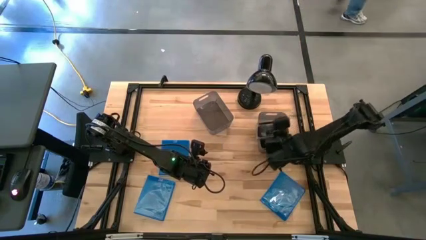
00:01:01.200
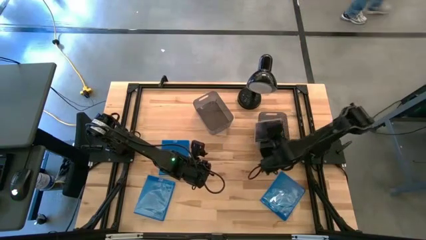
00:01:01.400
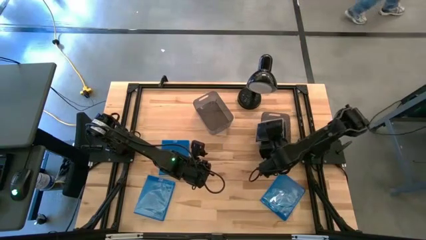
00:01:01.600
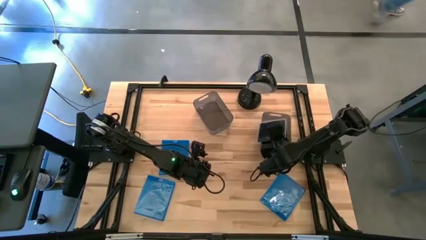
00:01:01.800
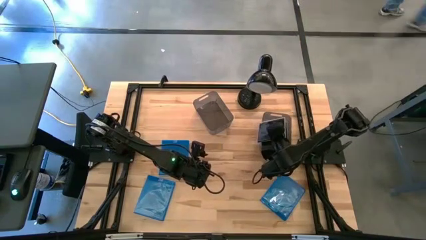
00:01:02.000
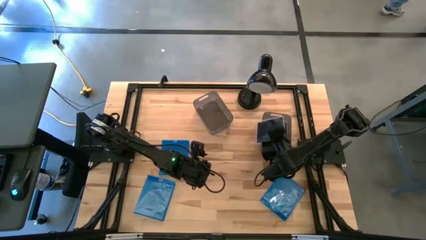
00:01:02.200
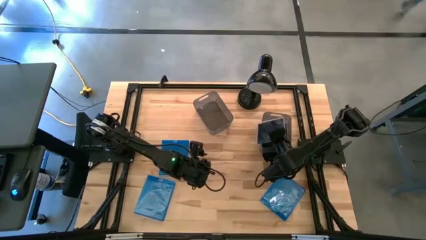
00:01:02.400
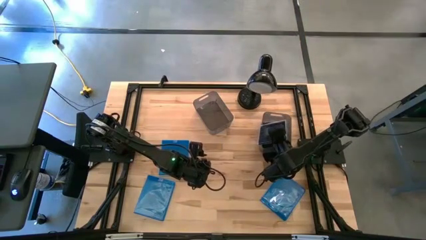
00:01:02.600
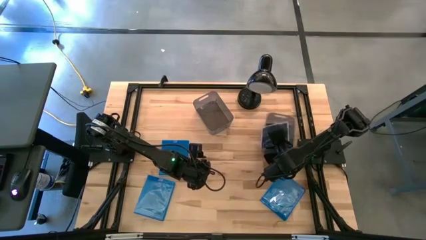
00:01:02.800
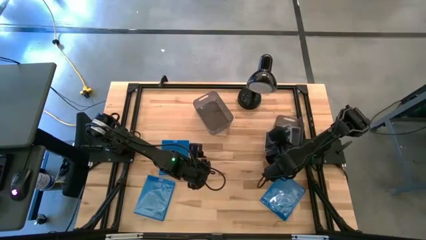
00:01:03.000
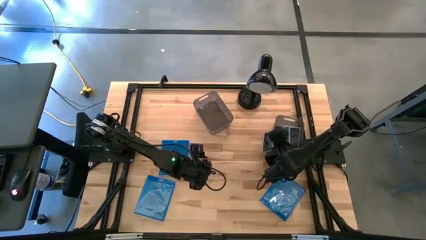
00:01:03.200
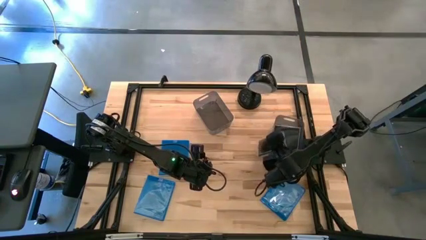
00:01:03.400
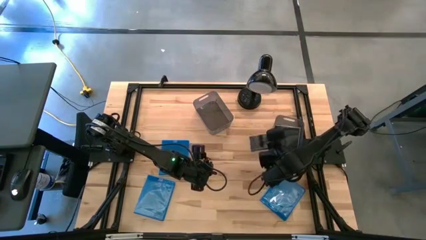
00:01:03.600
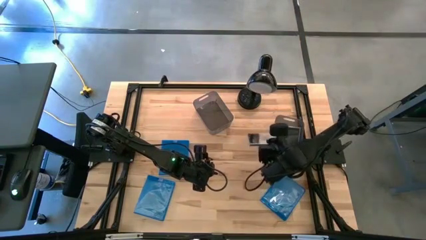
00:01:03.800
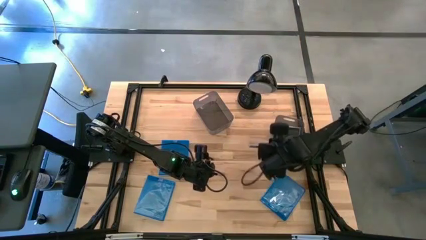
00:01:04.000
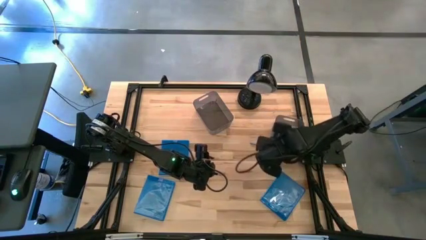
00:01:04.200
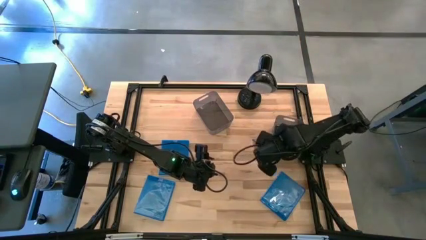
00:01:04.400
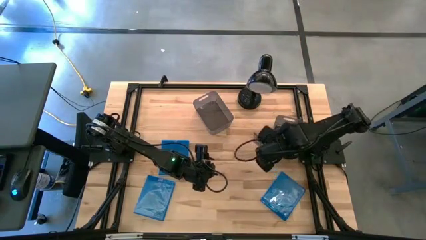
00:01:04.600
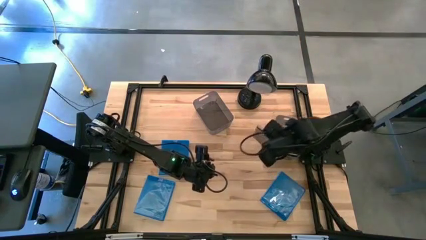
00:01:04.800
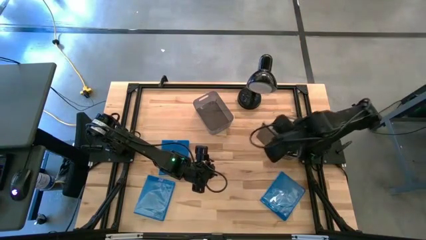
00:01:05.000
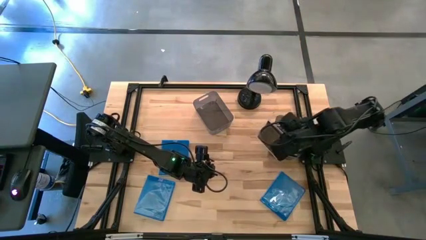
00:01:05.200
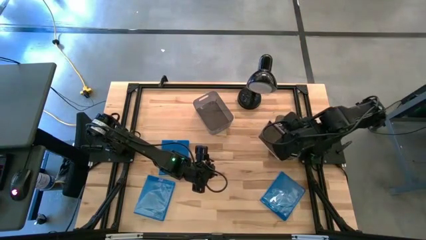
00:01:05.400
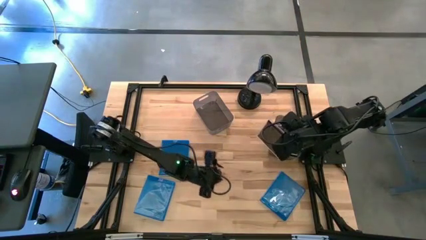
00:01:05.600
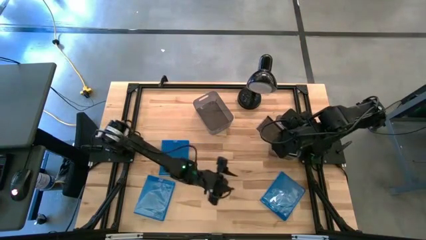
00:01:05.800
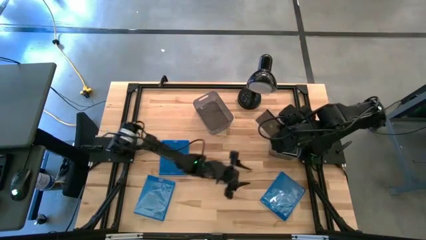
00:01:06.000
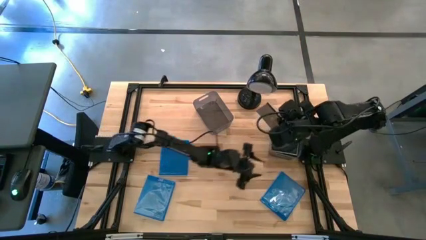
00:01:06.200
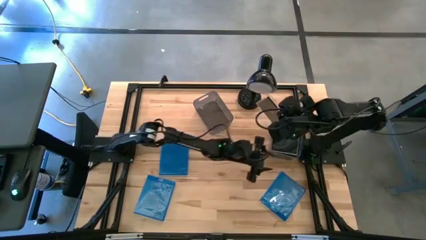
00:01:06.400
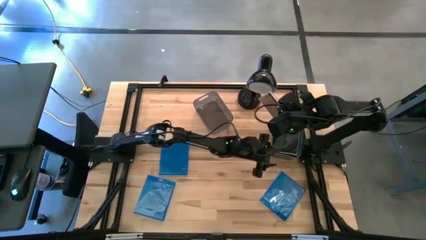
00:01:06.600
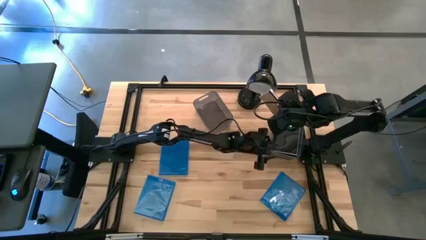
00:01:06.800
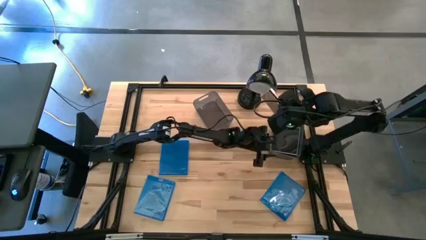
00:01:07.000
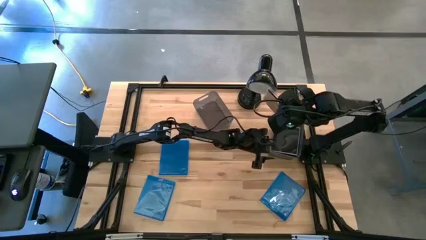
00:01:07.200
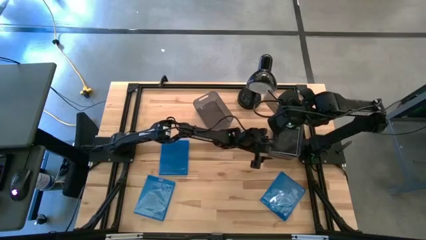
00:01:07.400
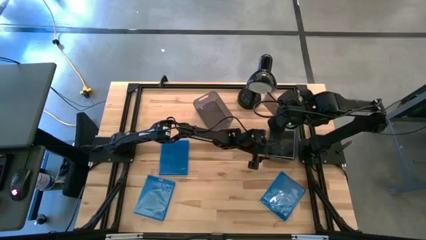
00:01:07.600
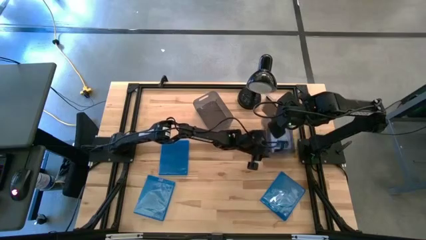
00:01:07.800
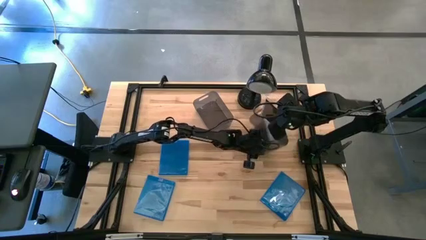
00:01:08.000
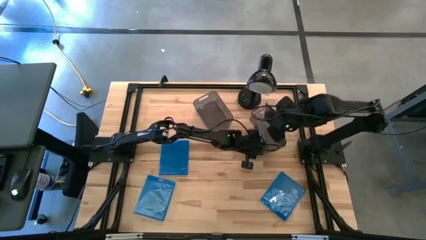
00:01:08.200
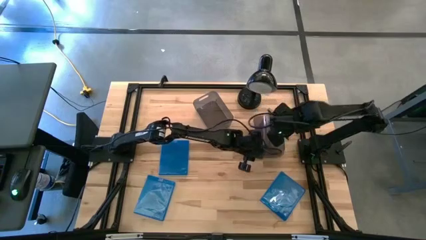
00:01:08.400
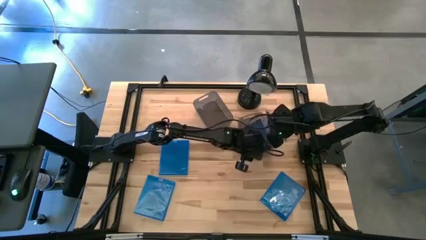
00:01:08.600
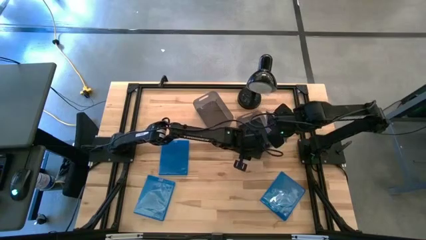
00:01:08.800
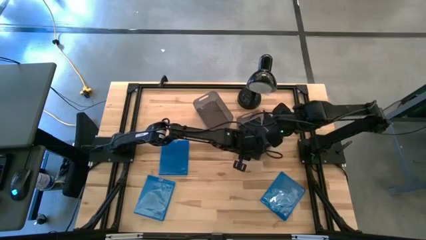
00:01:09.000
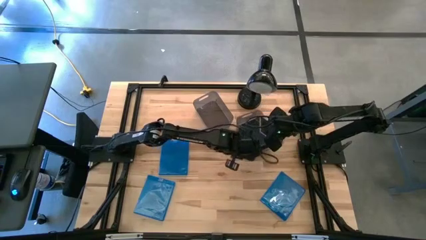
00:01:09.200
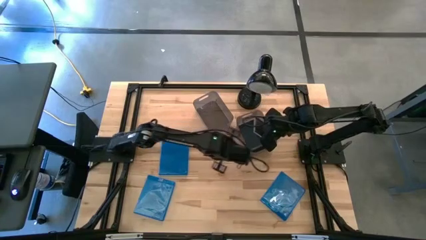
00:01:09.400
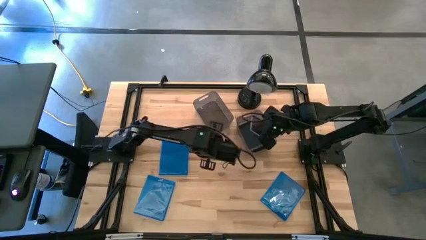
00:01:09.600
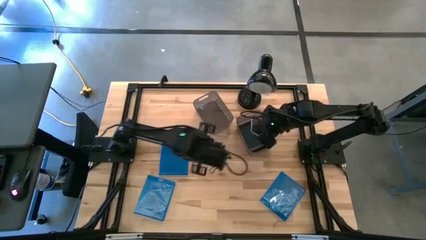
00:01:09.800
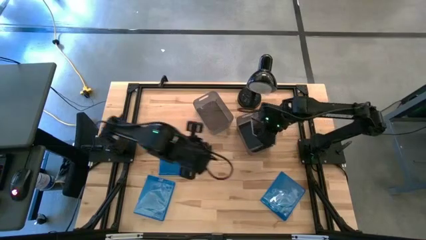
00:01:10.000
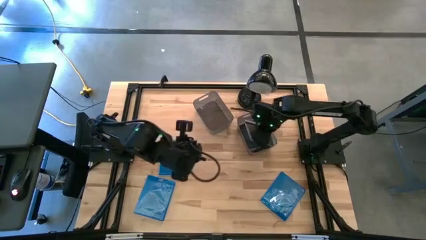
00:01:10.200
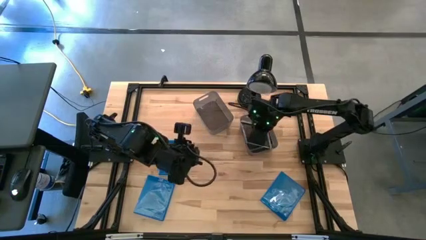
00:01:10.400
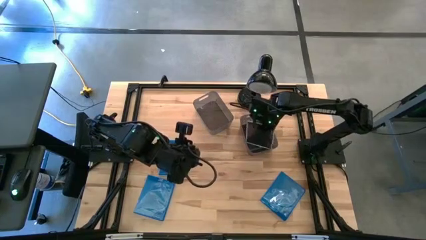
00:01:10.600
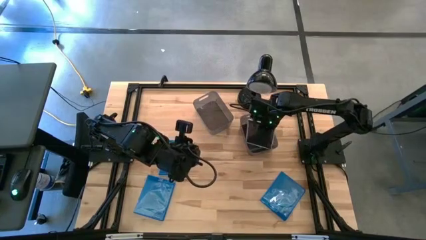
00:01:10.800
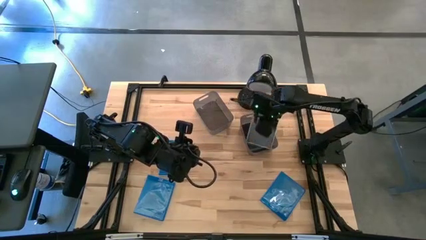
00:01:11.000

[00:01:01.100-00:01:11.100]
Task: Pick & place jewel cases by type
Put the black CD case into the right black bin

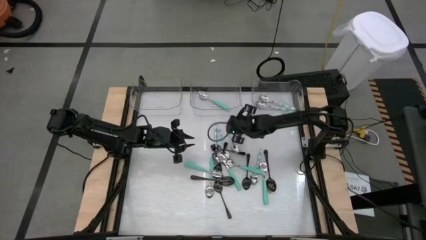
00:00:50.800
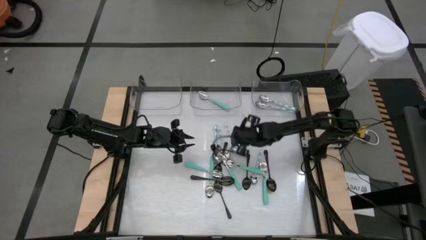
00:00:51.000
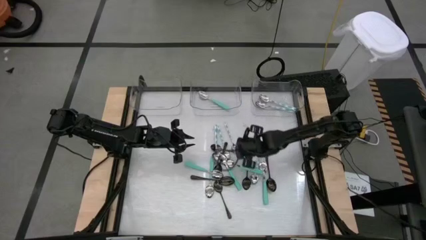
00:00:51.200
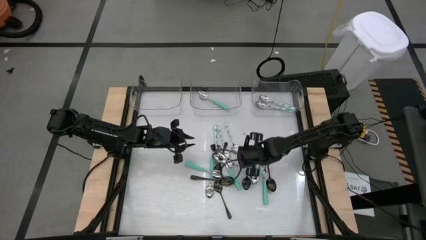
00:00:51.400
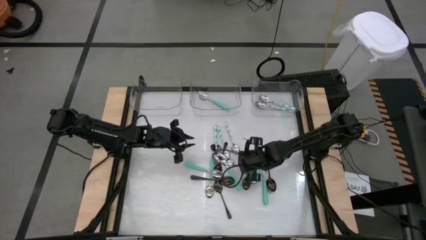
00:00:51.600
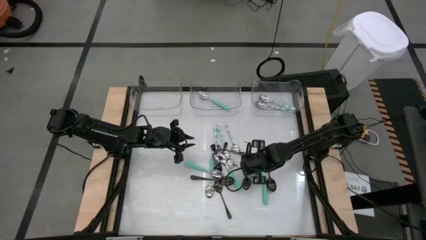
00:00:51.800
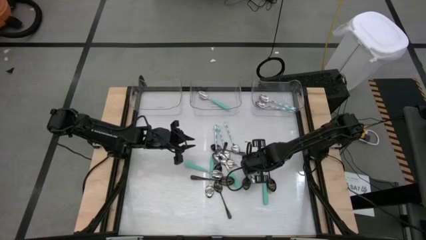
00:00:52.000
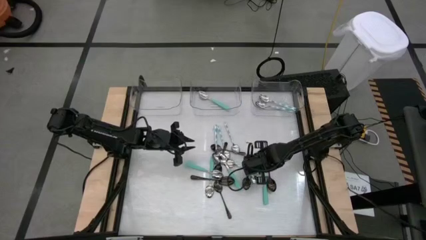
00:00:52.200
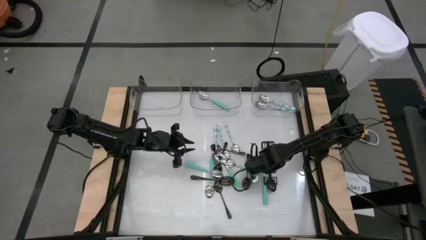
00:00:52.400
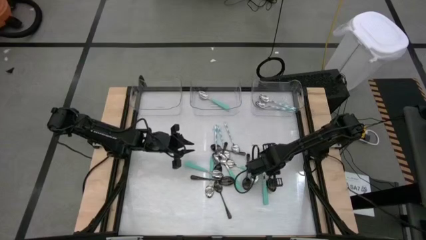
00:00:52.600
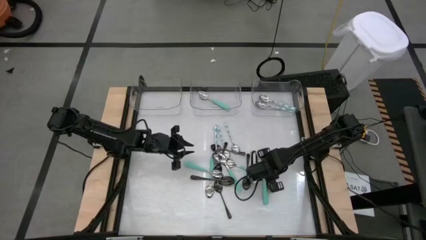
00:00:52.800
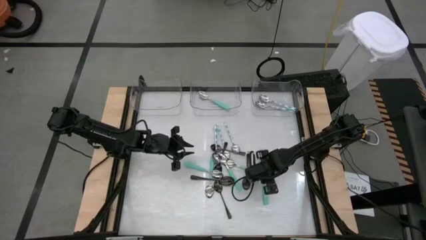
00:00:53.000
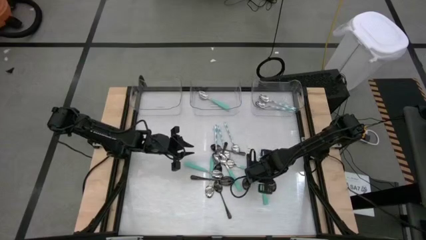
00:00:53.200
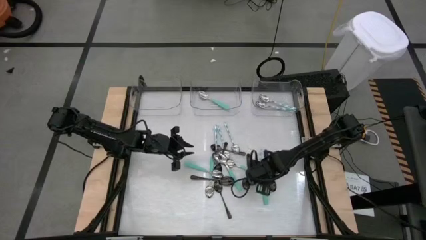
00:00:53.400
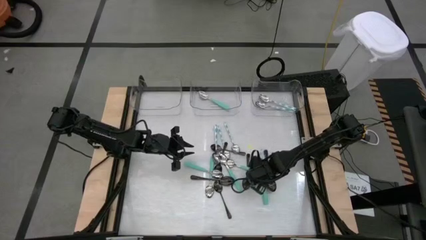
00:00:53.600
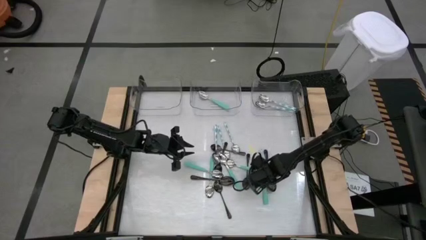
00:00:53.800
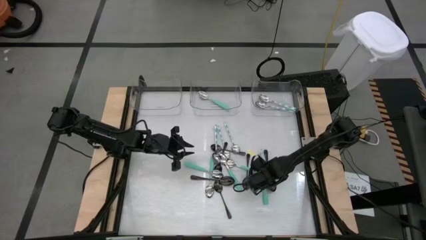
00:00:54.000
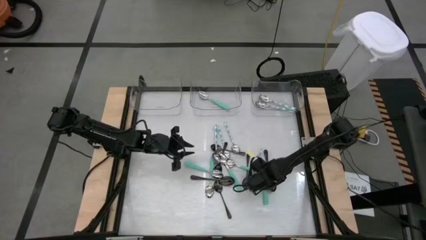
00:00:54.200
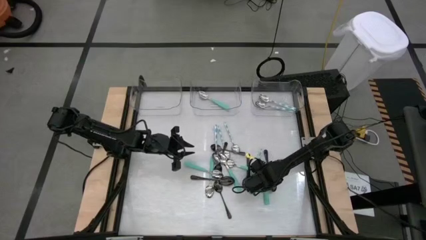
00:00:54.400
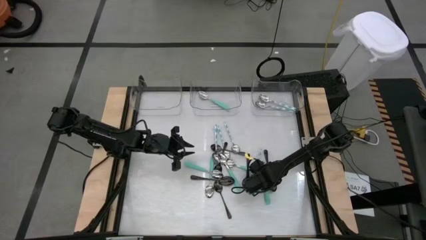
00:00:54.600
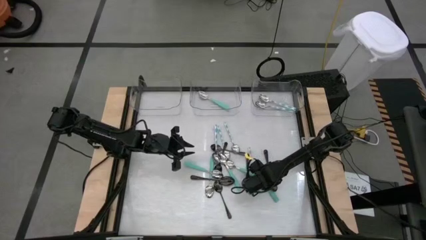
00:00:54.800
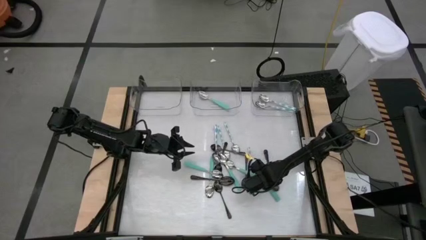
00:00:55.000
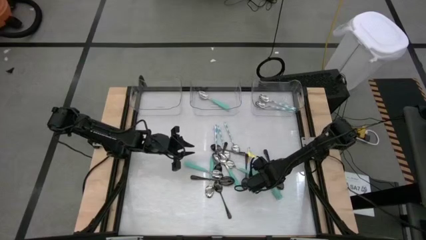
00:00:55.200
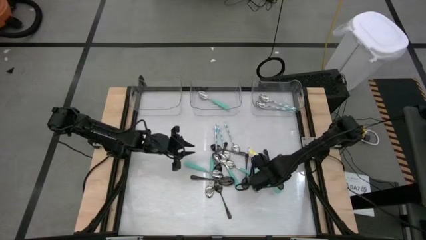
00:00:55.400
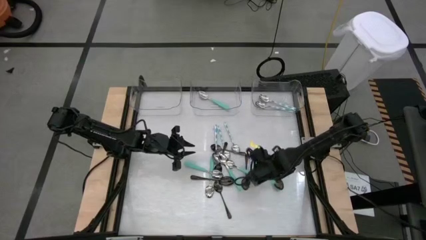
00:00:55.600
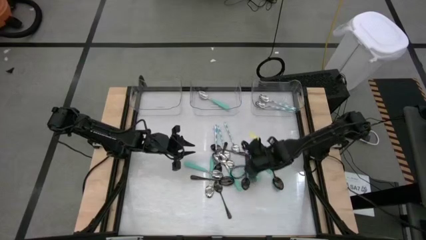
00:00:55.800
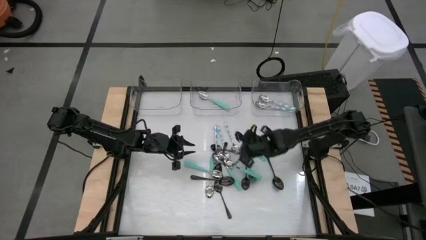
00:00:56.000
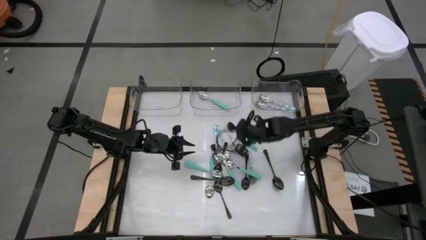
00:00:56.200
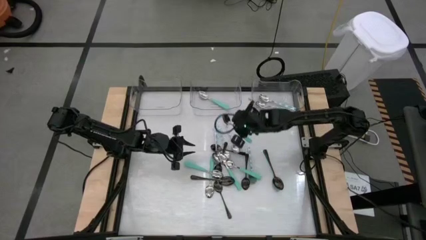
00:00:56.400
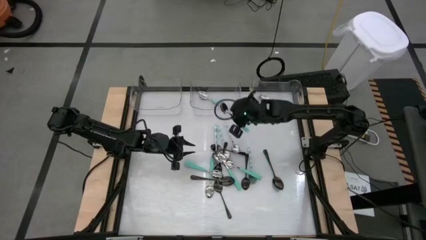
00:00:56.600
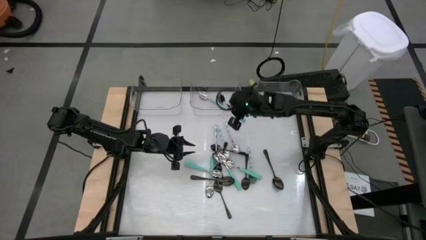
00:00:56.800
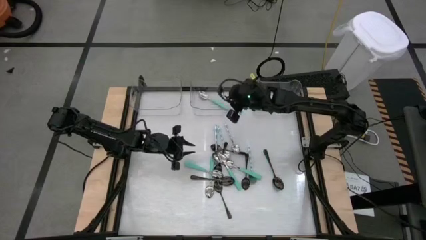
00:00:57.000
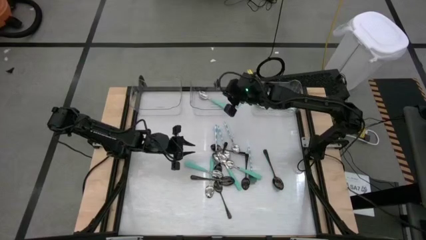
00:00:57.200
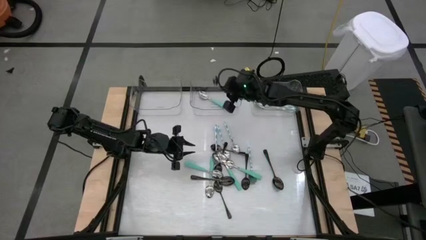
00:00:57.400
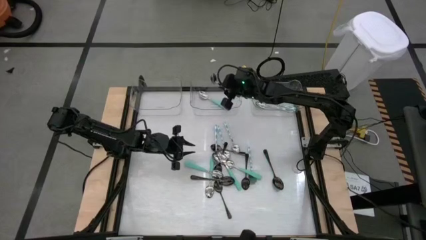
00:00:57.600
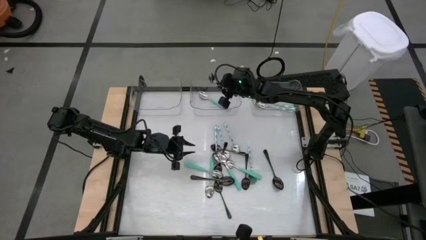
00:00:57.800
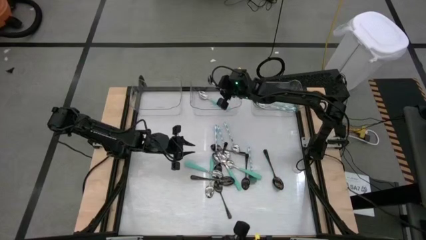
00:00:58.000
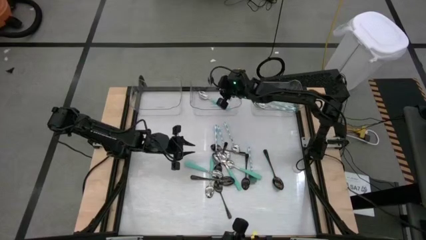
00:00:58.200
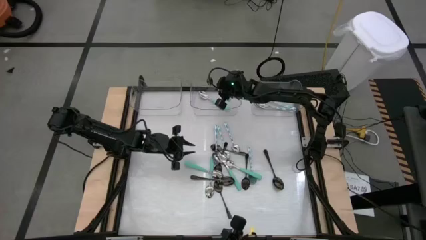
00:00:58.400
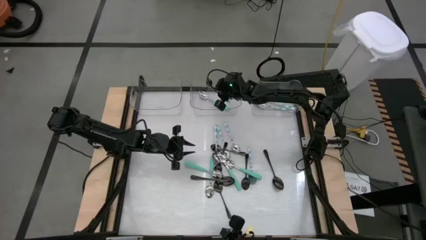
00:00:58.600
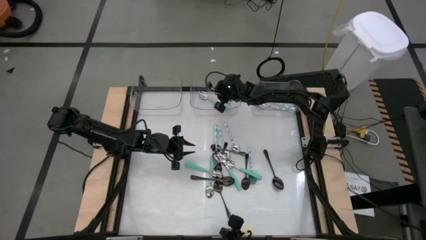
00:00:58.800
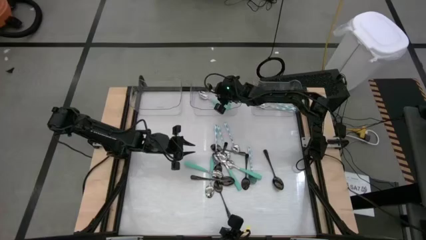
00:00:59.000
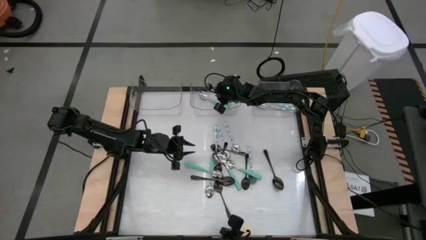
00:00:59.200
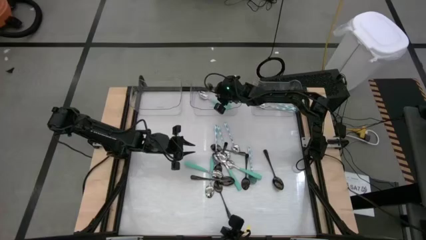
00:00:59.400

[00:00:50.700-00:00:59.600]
Task: Sort silverware by color (type)
Put the green spoon into the center transparent bin
